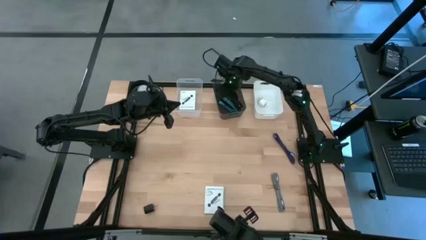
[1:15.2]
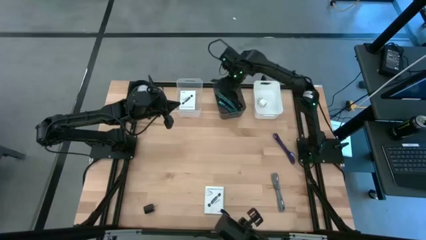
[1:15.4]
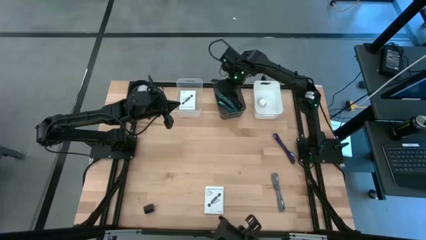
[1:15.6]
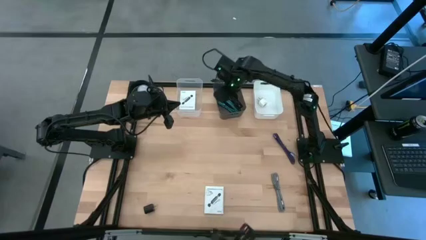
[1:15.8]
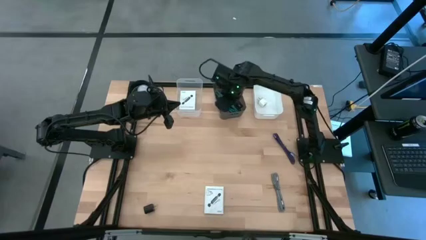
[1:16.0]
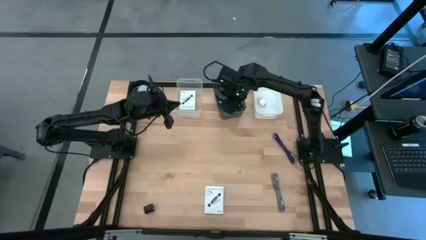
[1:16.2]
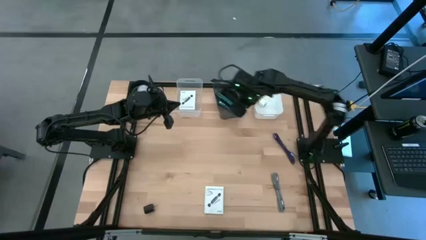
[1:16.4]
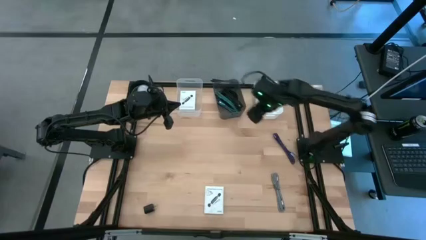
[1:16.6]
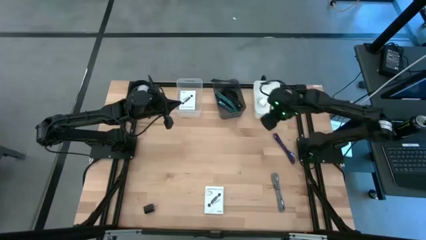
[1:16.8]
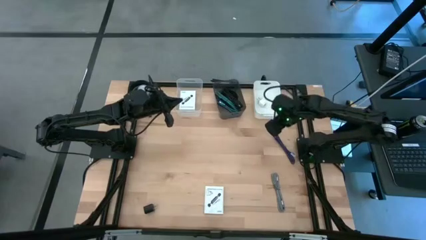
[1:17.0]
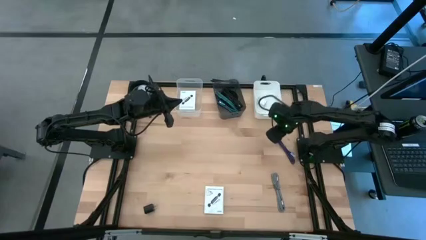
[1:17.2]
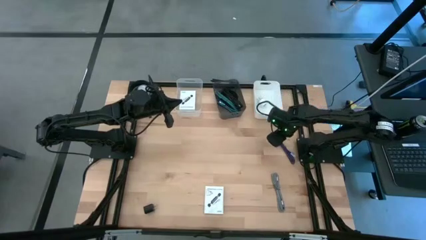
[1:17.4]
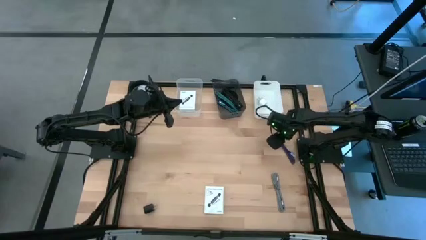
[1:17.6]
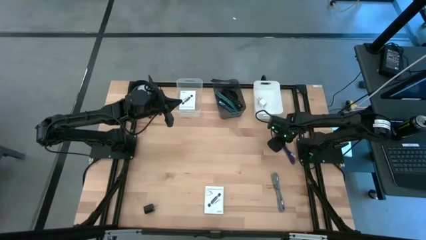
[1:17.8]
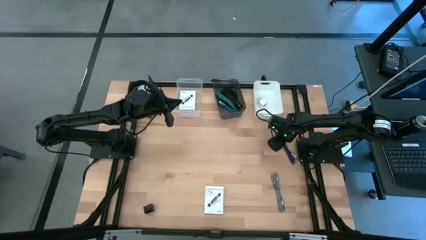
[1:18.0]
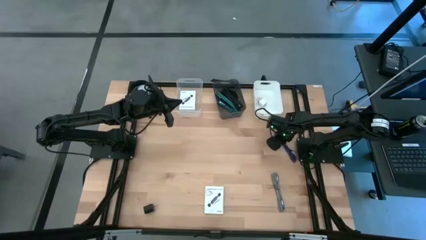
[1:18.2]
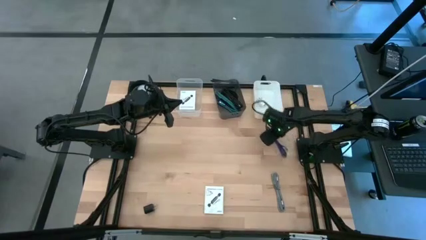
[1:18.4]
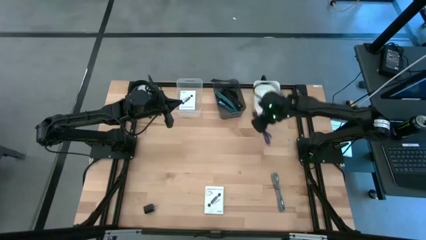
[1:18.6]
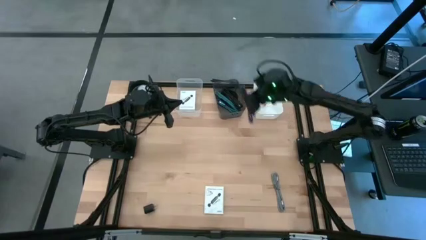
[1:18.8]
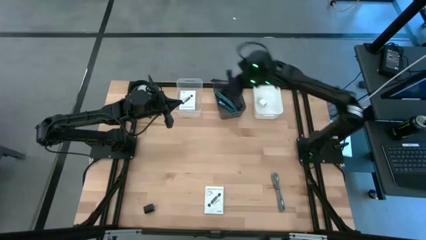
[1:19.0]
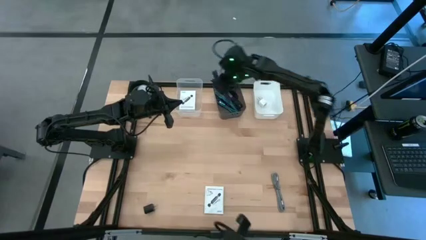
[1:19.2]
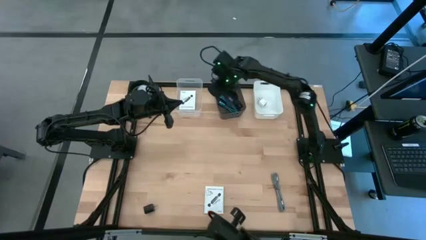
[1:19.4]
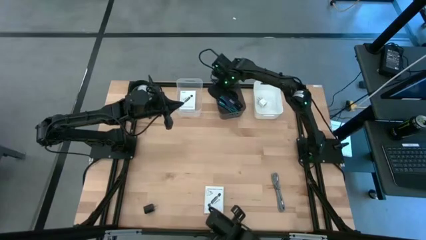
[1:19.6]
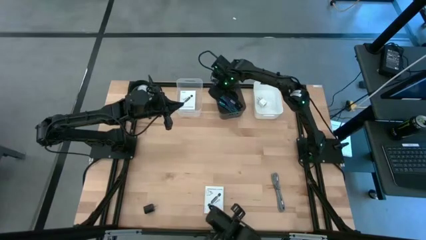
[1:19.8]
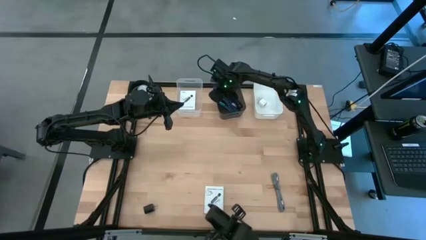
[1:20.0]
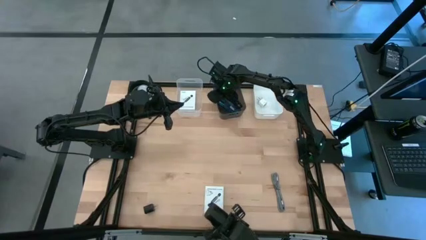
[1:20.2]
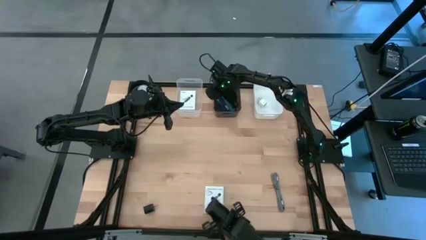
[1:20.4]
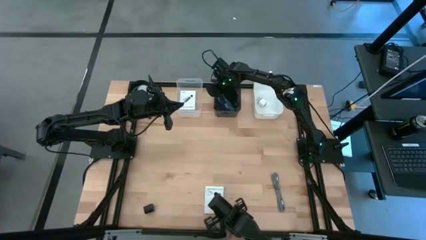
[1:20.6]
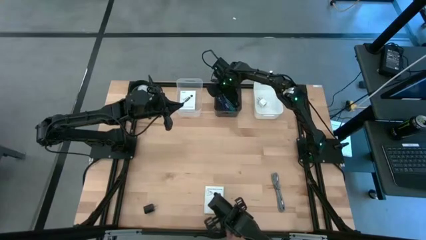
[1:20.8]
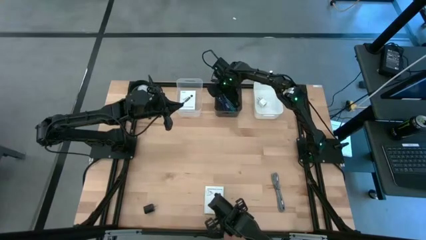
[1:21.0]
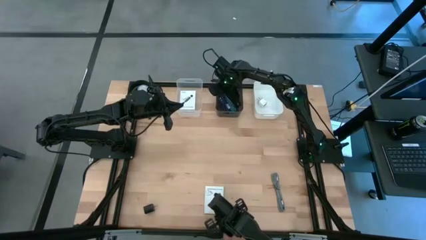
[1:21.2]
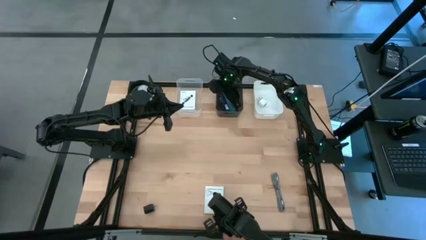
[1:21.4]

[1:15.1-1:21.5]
Task: Pick and place items into bin
Put the violet charger cable into the black bin

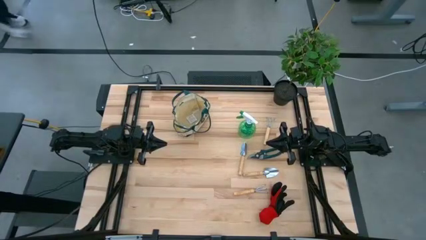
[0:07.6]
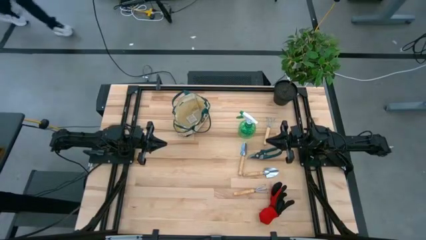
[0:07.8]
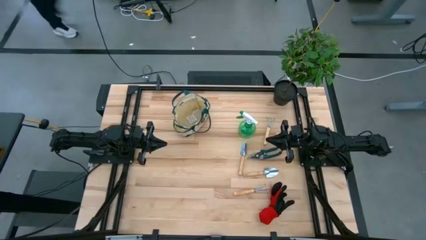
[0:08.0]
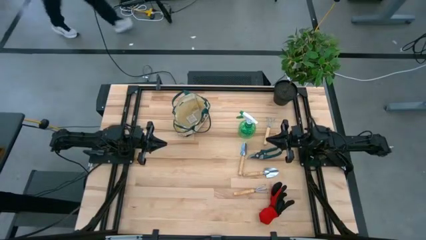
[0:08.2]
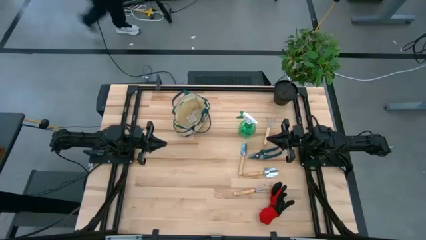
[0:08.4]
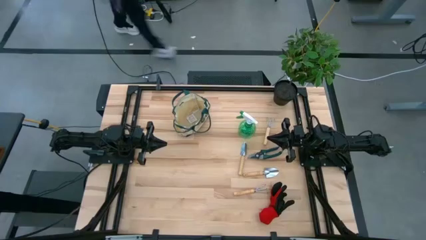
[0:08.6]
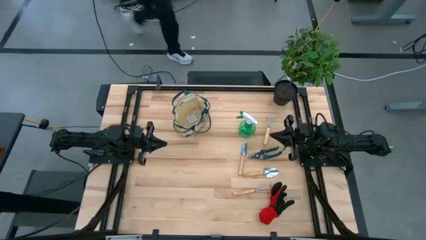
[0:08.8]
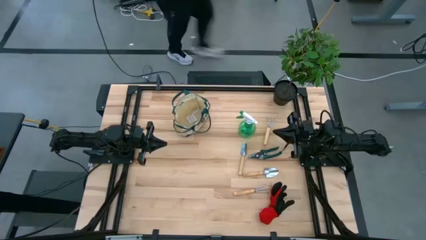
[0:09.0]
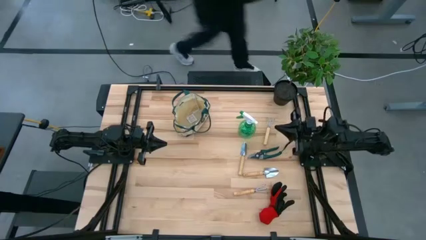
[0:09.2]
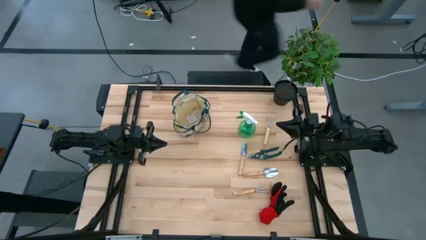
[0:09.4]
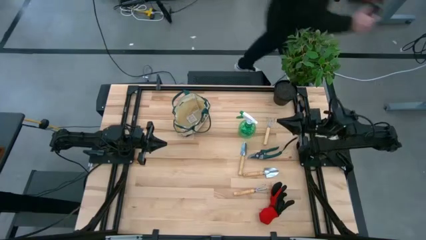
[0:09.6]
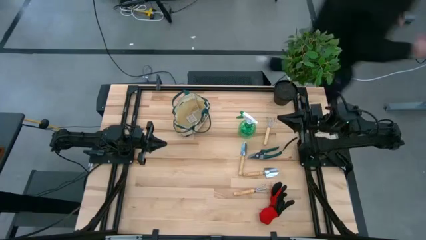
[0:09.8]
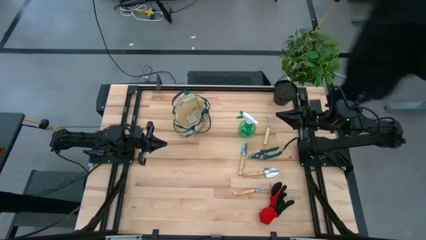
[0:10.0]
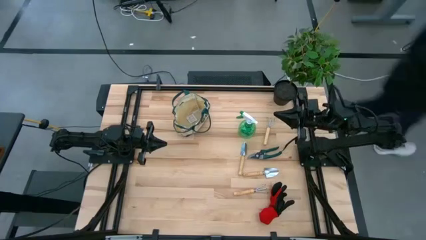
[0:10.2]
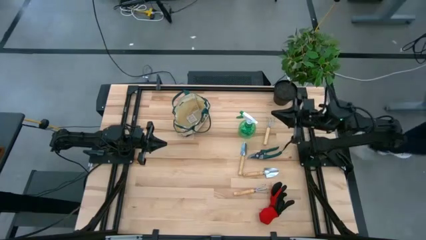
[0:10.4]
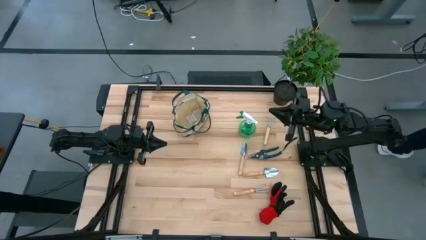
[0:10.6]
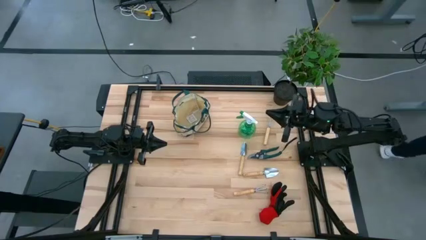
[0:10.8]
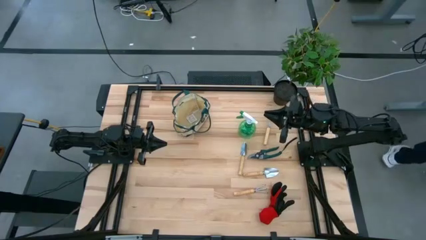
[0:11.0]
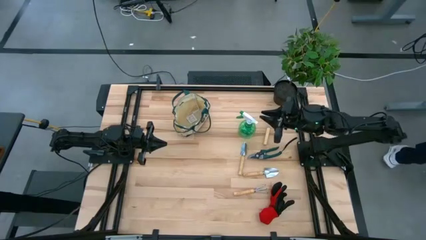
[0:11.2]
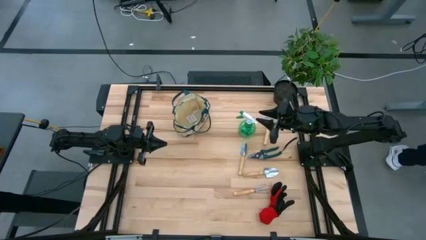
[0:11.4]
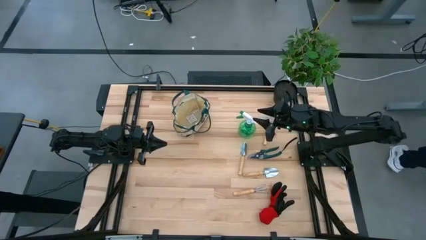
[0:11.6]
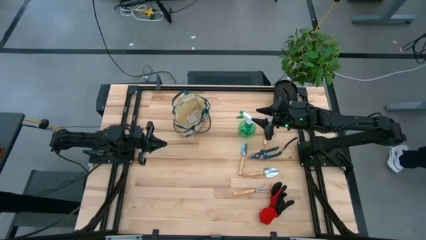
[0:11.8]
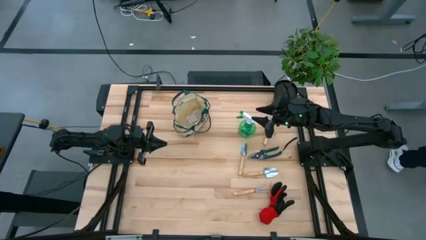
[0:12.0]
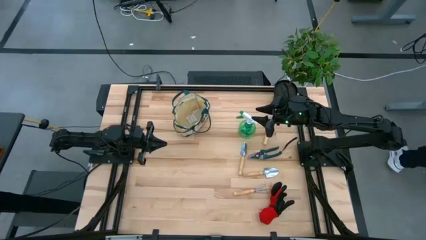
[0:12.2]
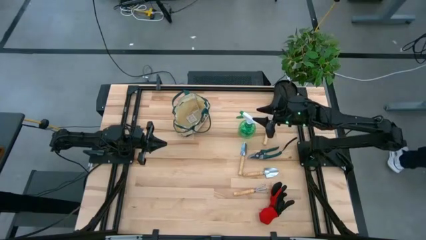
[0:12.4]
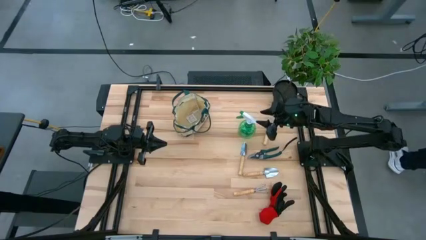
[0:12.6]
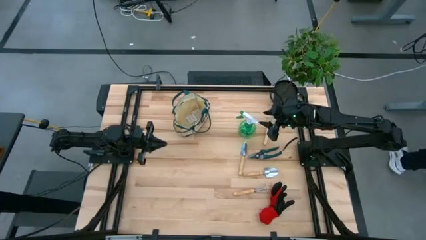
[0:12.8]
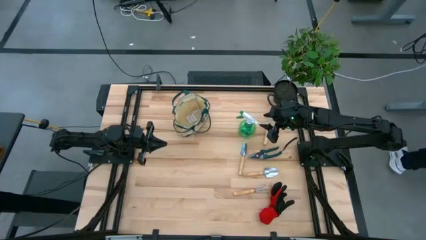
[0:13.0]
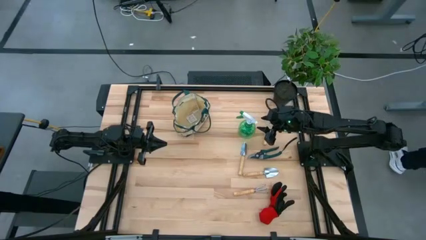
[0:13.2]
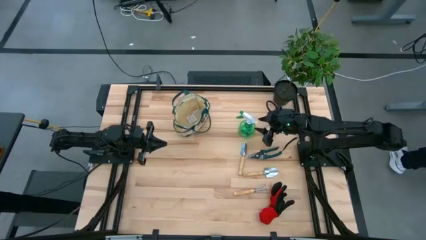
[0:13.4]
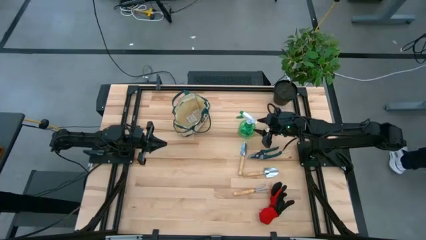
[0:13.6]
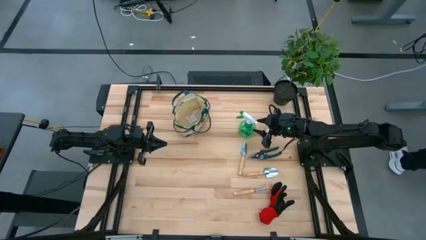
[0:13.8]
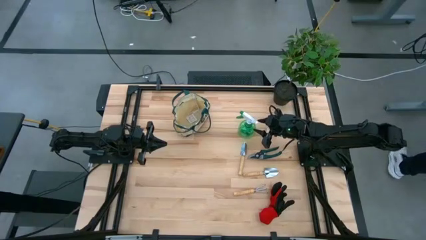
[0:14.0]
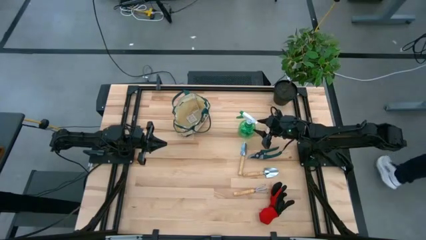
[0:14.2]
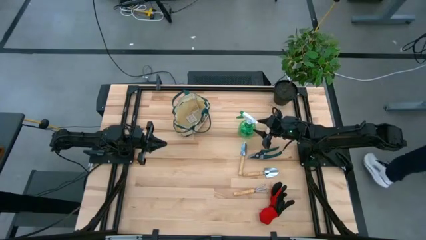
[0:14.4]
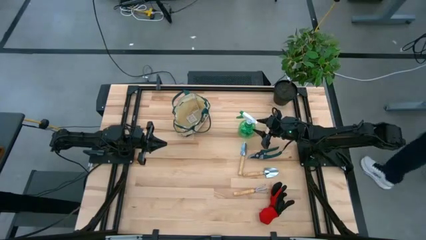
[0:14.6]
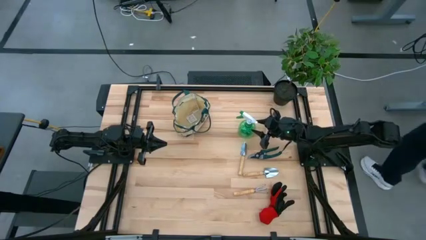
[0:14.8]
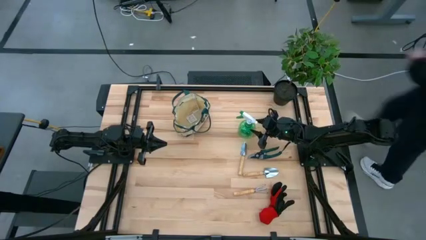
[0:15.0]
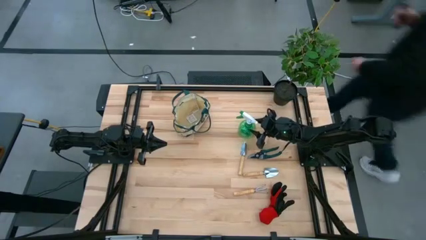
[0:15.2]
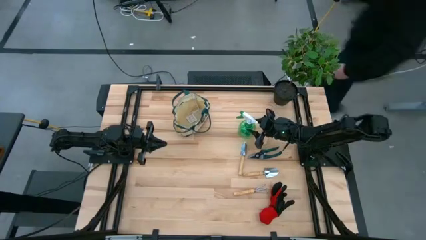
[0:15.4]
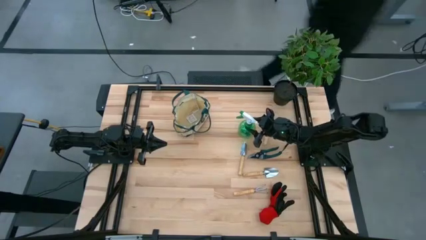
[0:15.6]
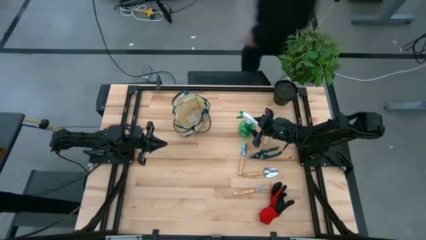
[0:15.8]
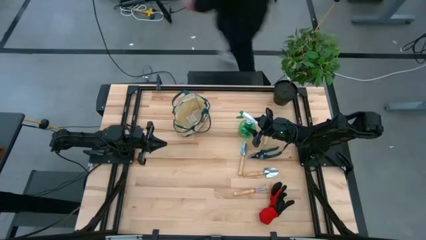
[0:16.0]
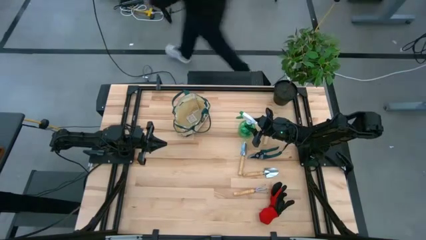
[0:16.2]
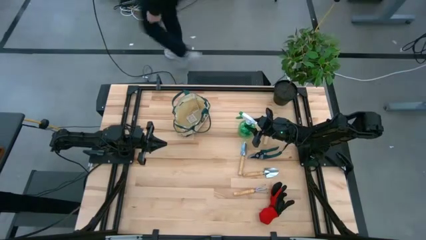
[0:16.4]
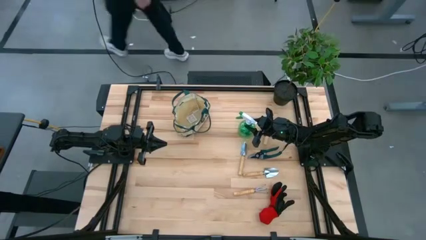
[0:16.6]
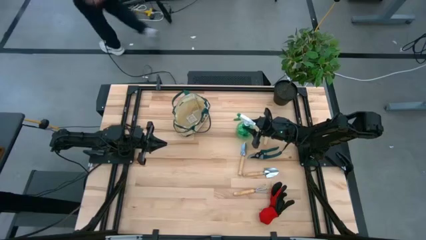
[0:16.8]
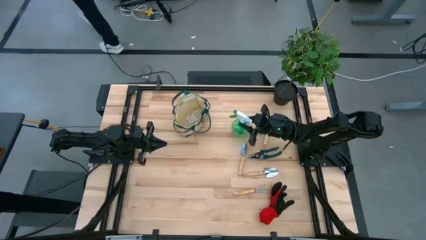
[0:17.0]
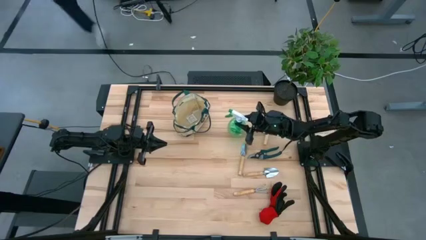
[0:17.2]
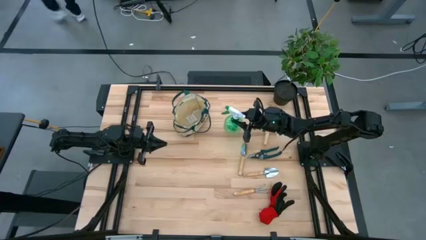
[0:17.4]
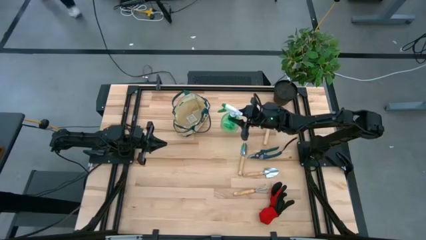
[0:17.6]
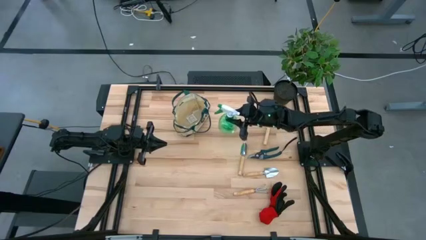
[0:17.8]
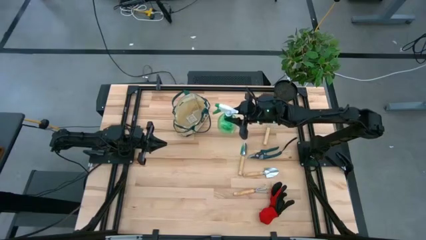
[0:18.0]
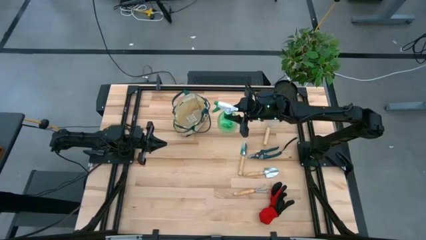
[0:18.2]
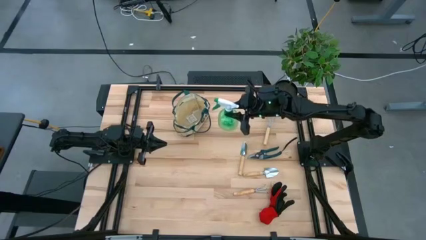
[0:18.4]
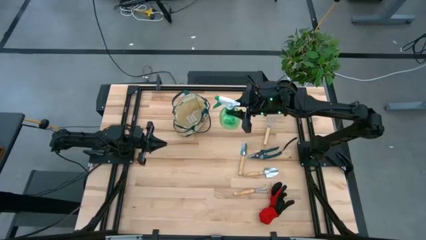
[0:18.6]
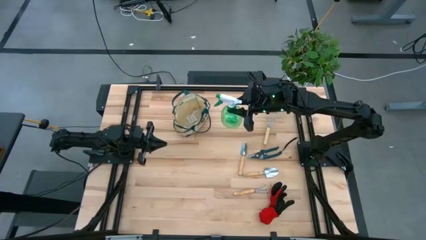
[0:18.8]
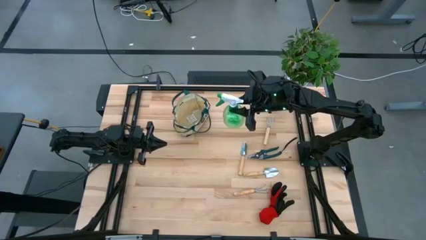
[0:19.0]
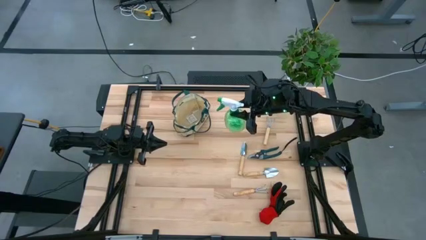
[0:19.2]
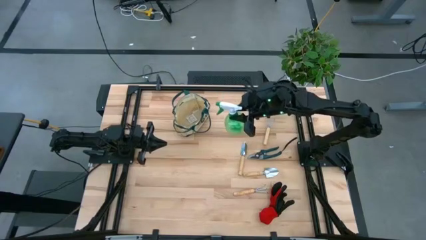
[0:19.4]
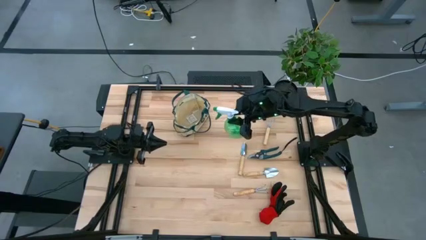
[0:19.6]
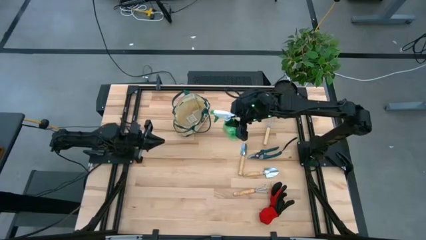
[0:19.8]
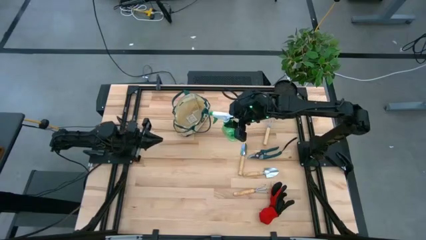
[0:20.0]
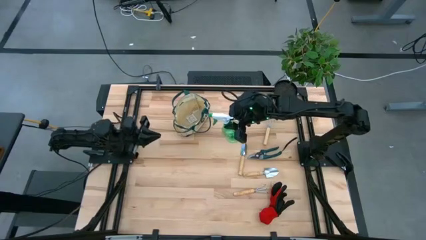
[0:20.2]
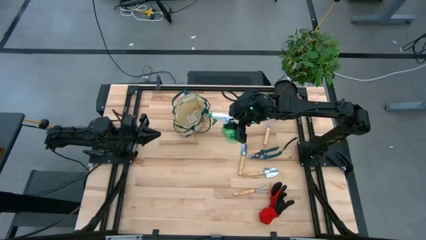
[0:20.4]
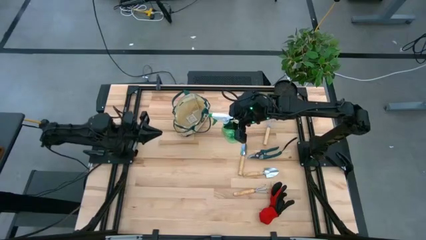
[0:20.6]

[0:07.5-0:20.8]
Task: Pick & Place Garden tools in Gardening bag
Put the green spray bottle into the gardening bag
